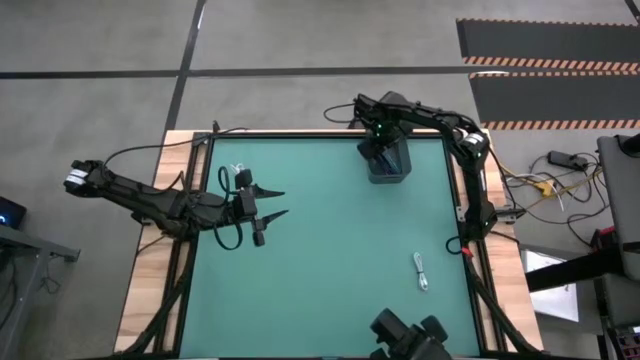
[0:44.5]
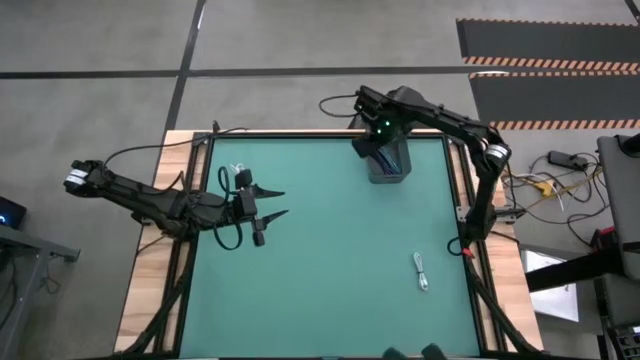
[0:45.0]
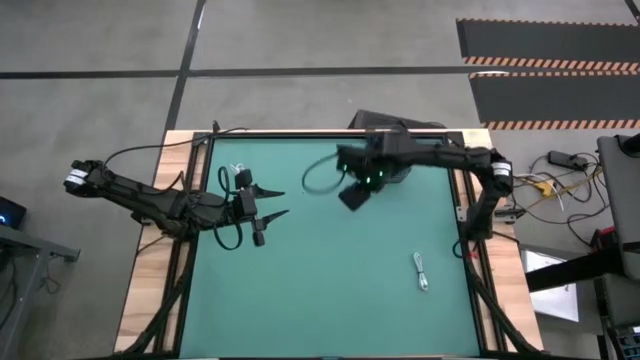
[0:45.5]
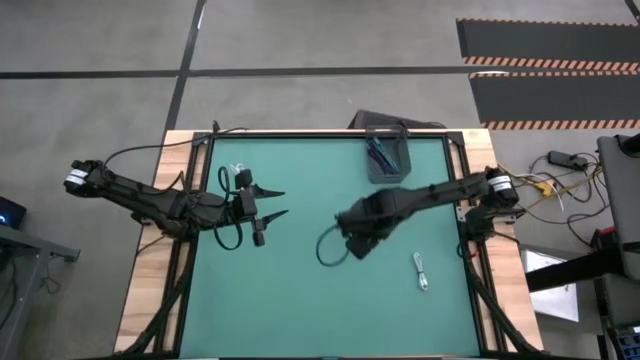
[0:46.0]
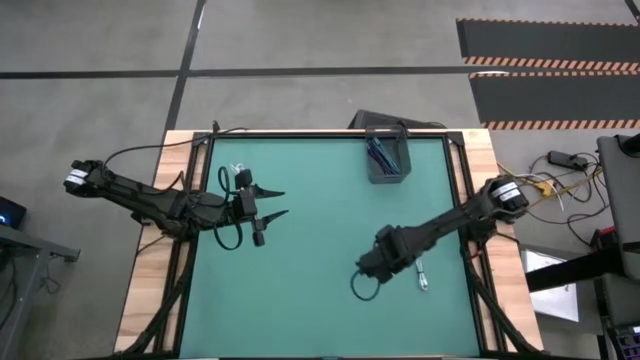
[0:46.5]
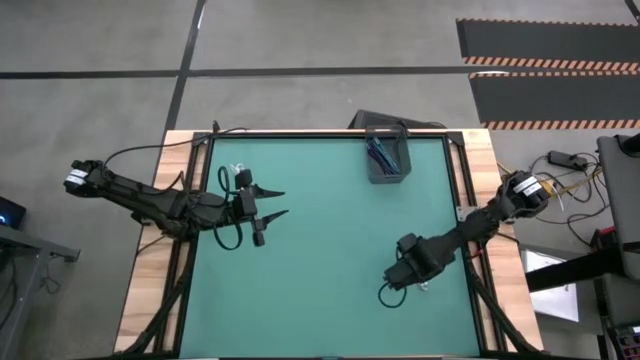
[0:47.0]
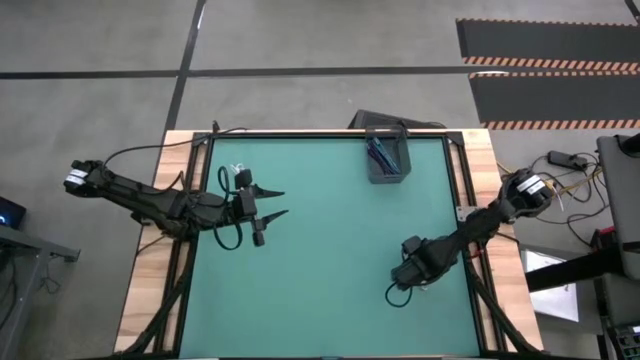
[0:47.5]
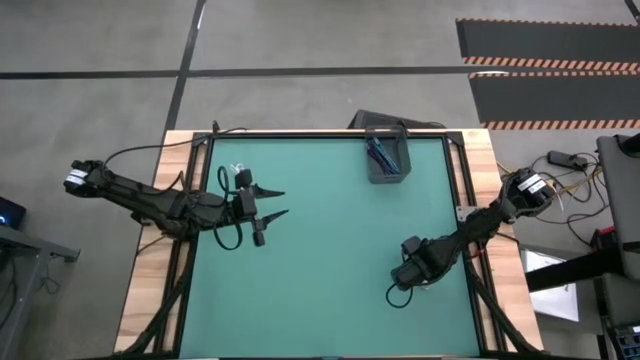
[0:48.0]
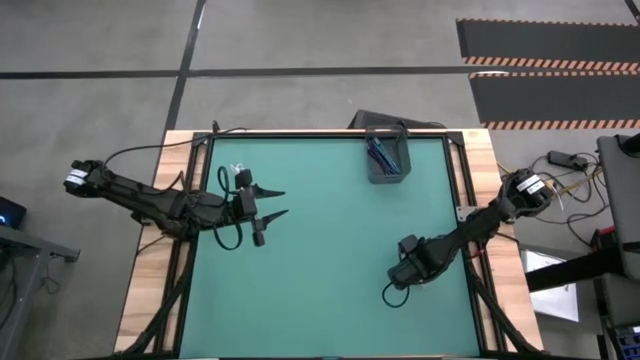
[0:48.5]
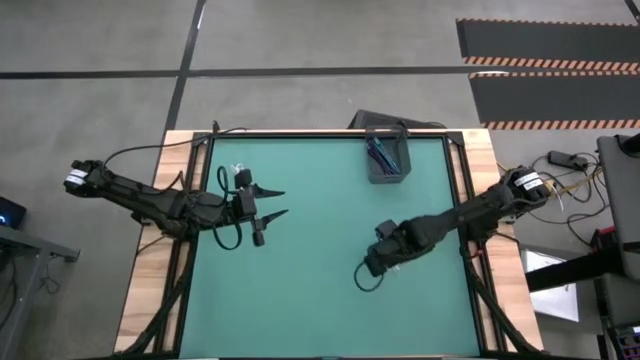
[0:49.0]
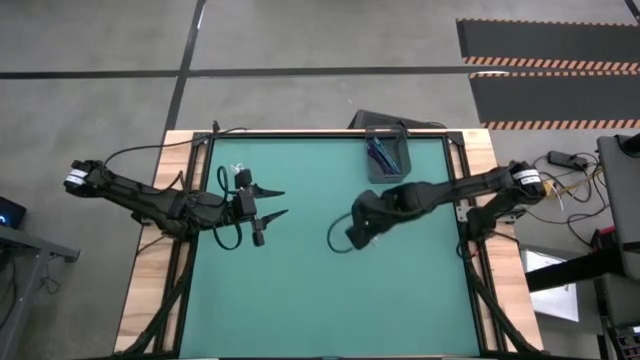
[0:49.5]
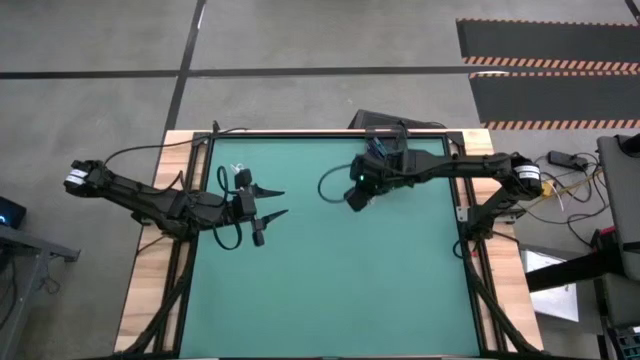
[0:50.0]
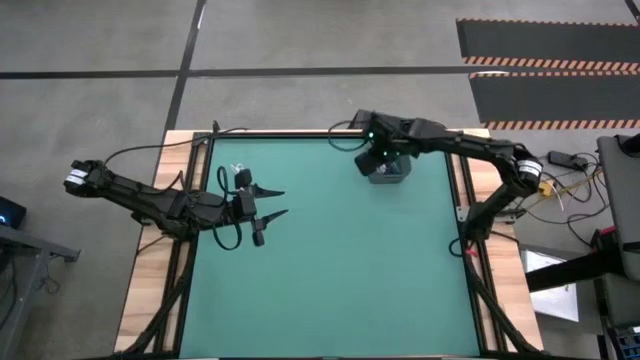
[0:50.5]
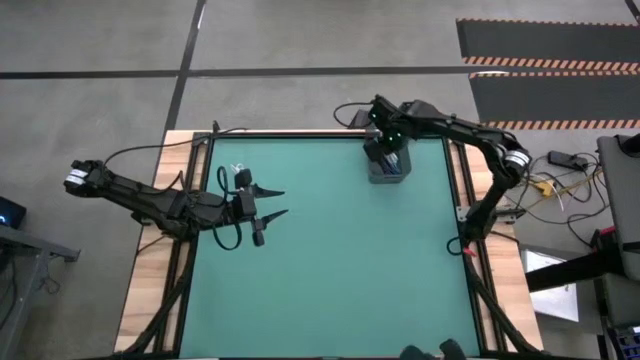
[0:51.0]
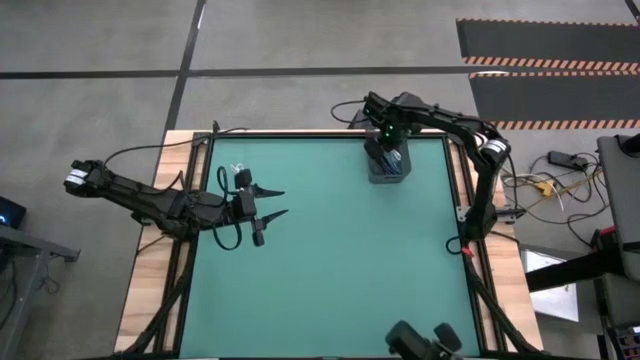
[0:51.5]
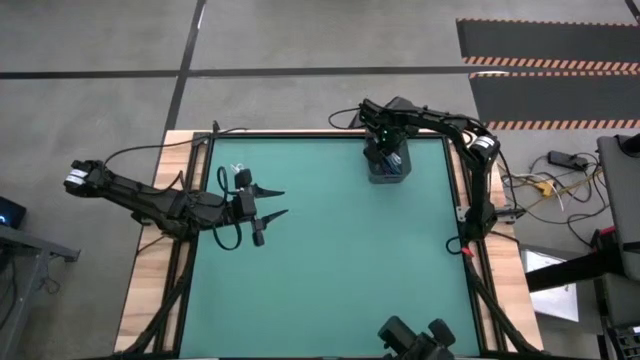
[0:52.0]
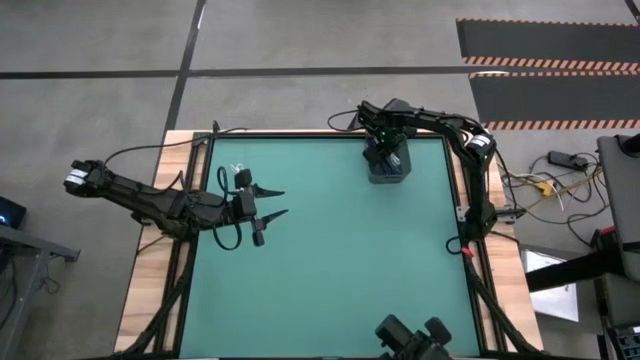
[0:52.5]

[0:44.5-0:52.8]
Task: Pick and place USB-C Cables
Put the bottom white charger cable into the black bin

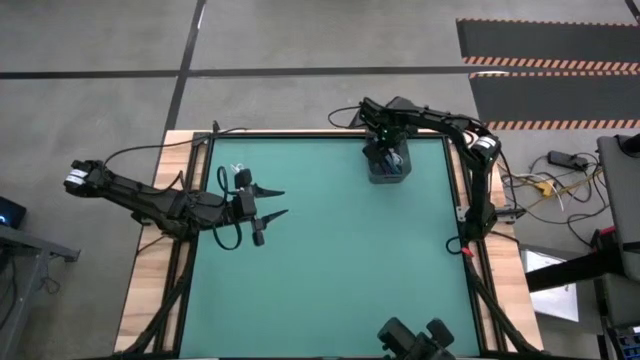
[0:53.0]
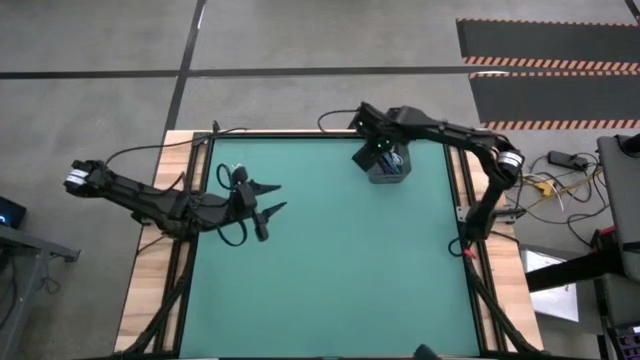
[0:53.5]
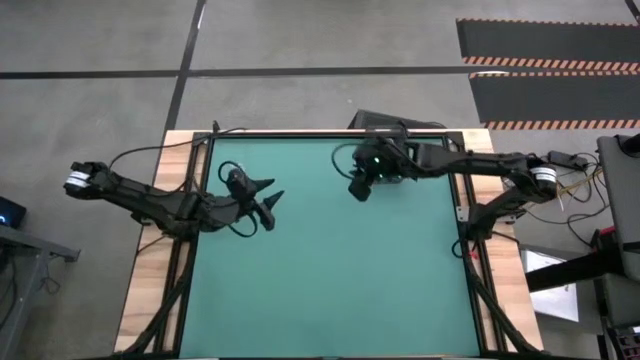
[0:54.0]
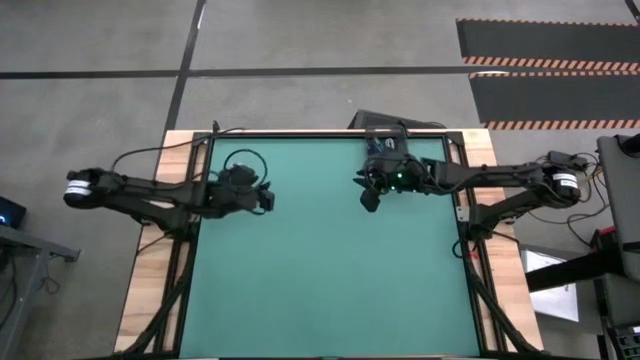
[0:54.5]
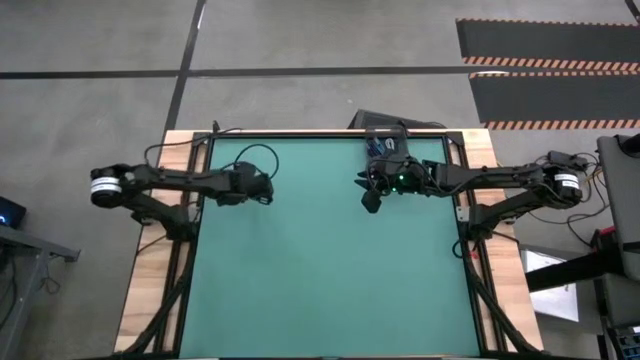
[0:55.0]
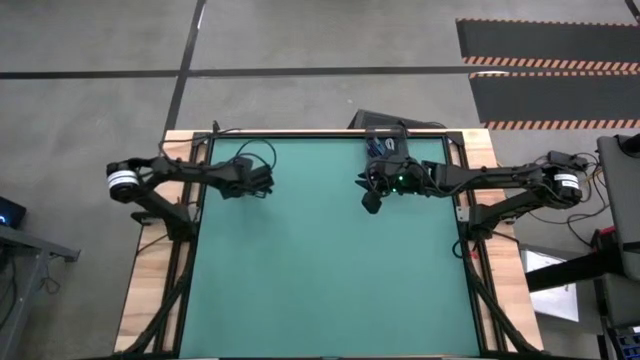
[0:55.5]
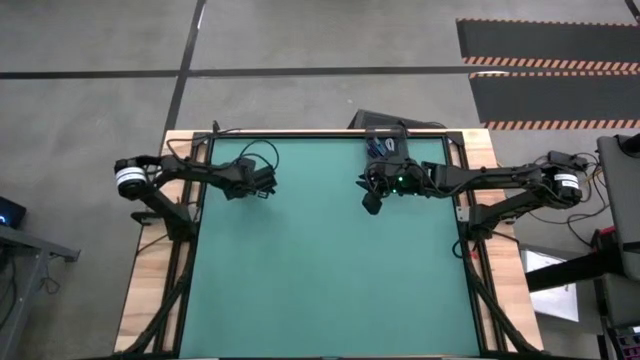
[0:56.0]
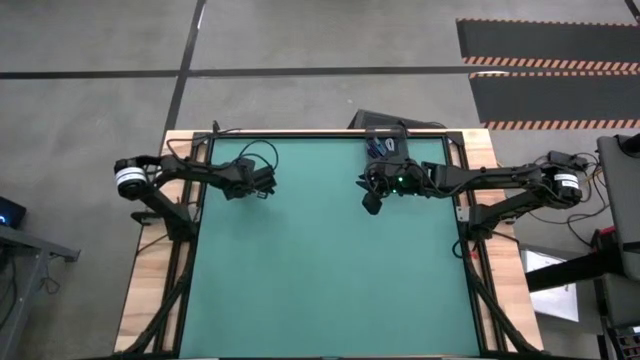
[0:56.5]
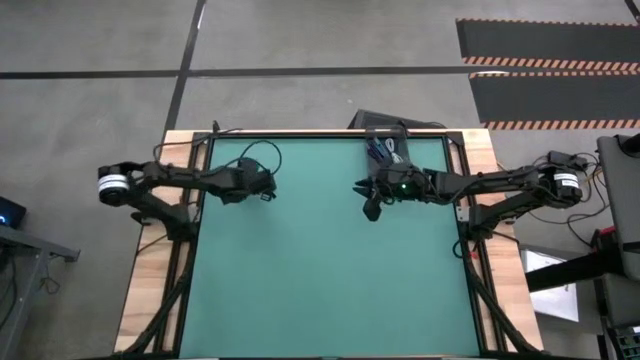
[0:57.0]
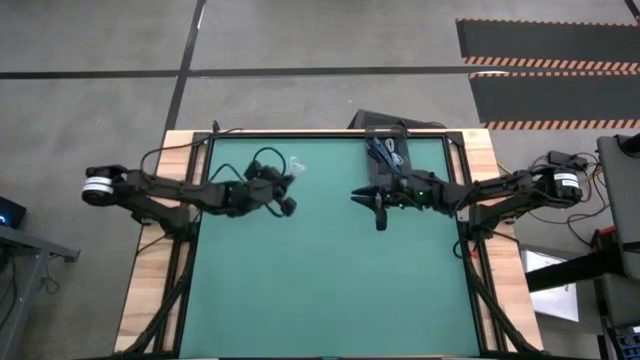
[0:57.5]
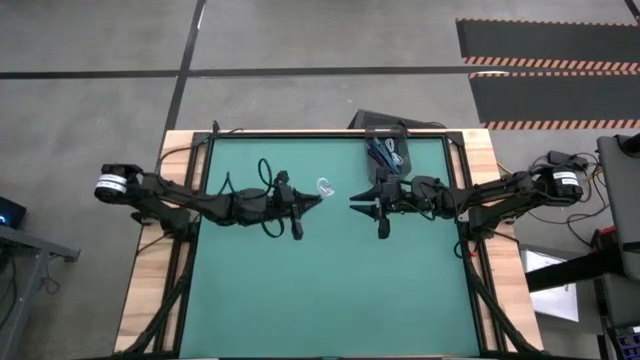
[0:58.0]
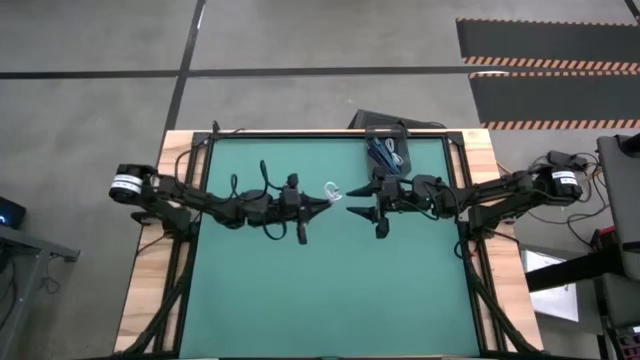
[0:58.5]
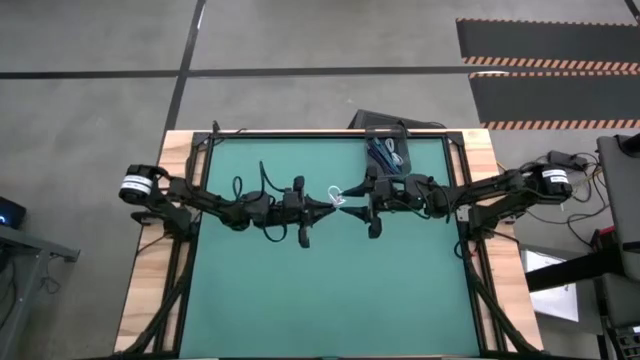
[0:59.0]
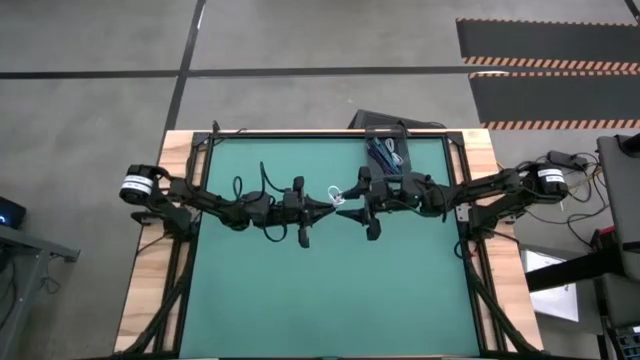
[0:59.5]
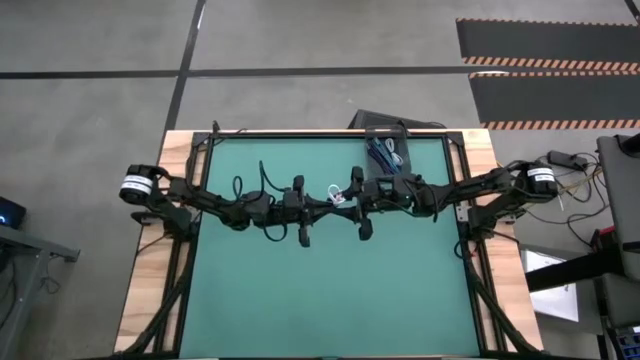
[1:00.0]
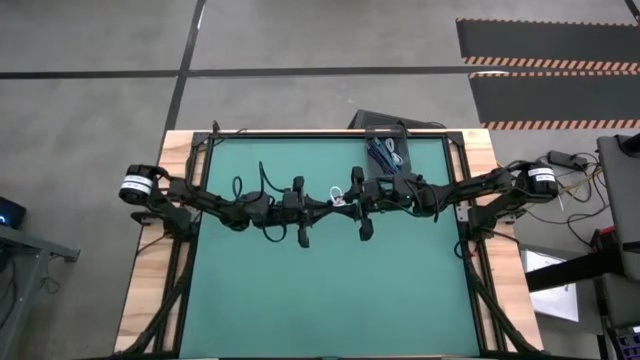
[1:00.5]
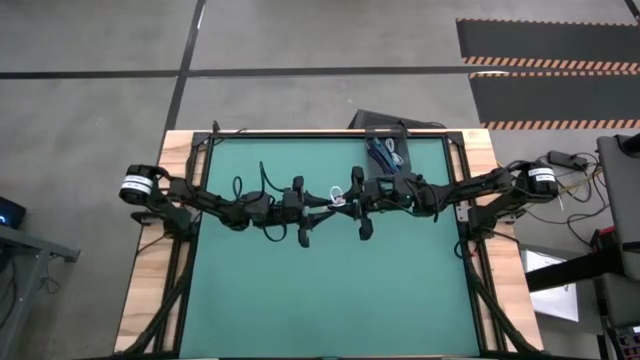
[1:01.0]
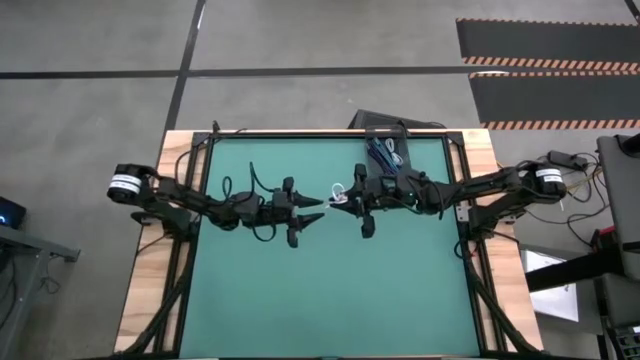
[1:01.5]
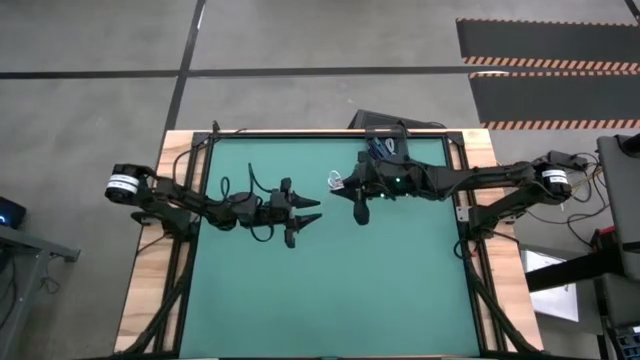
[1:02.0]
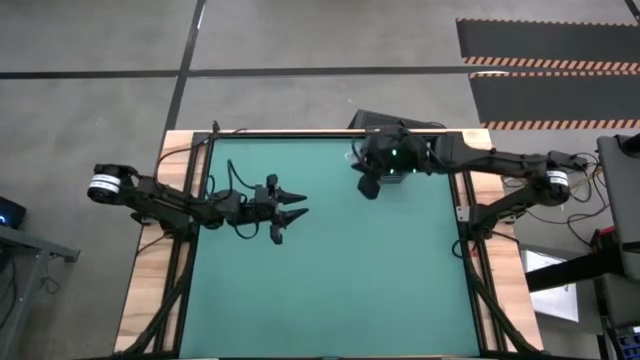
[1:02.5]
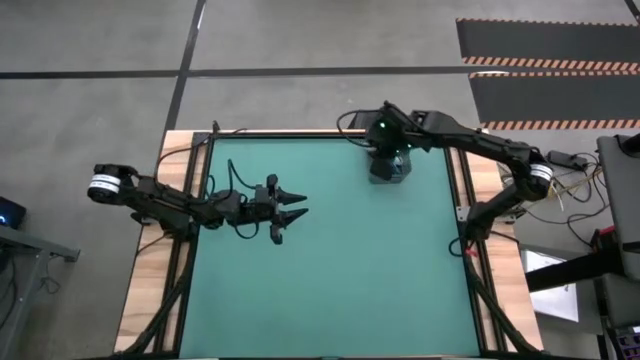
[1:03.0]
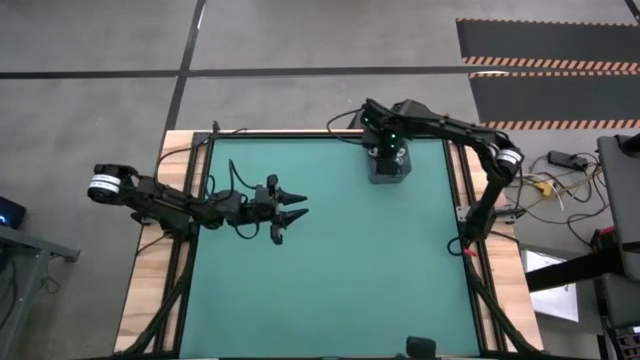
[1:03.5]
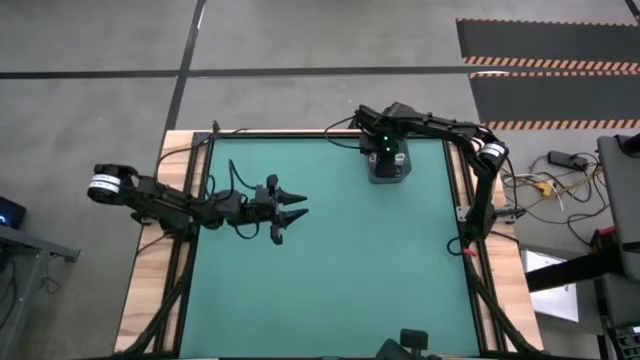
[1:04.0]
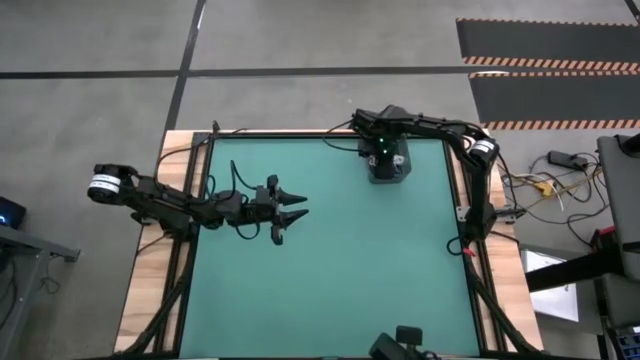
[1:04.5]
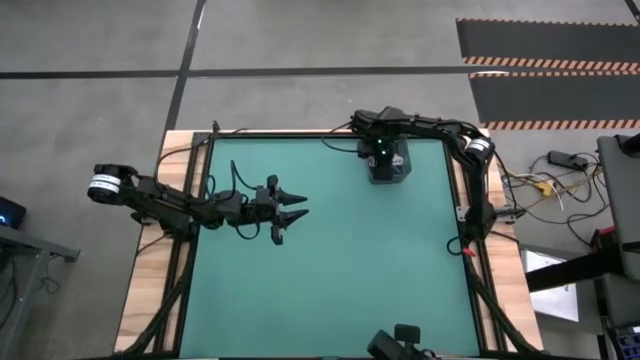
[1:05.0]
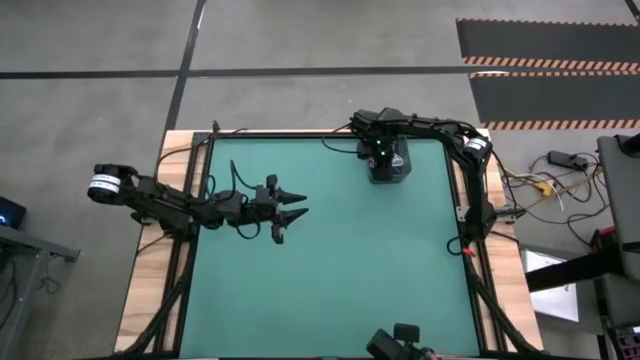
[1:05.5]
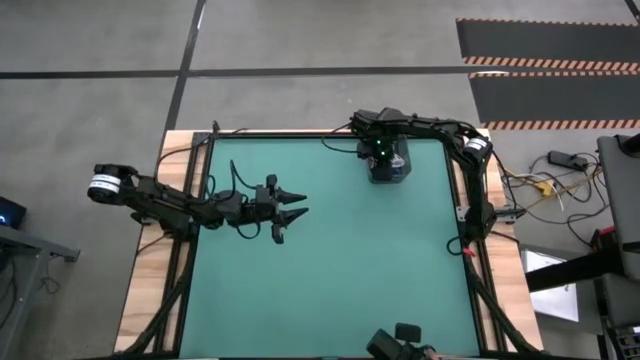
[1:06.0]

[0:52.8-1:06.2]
Put the white charger cable into the black bin
